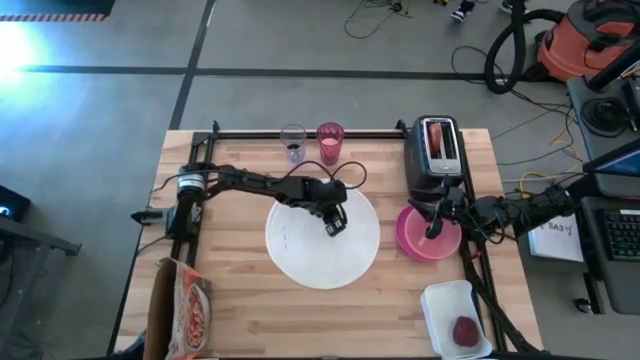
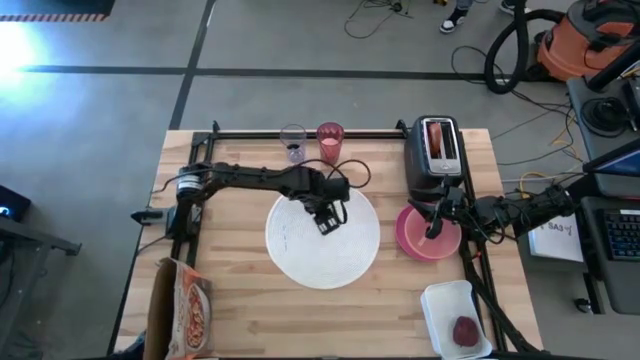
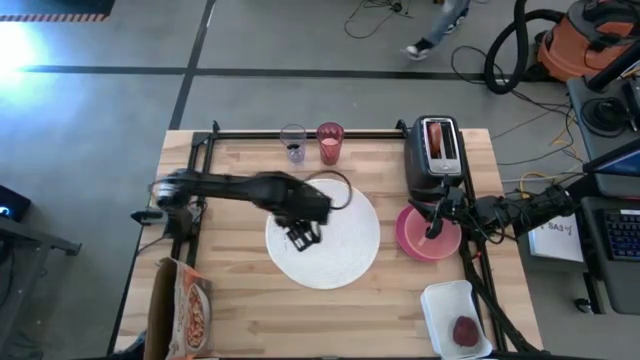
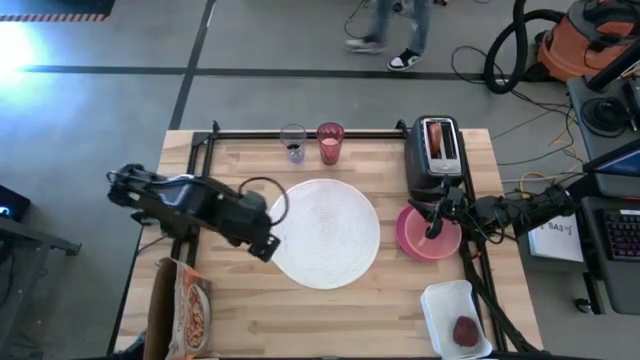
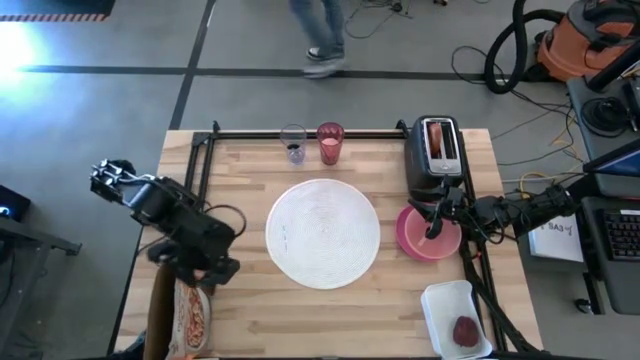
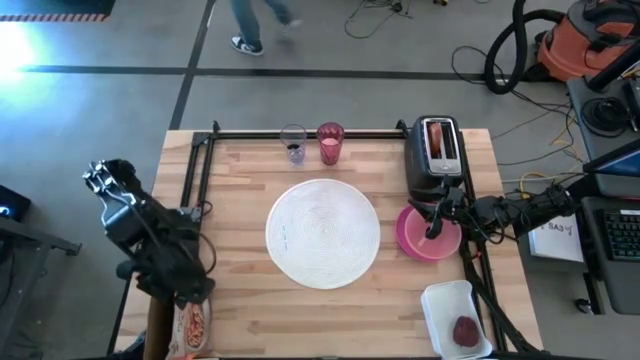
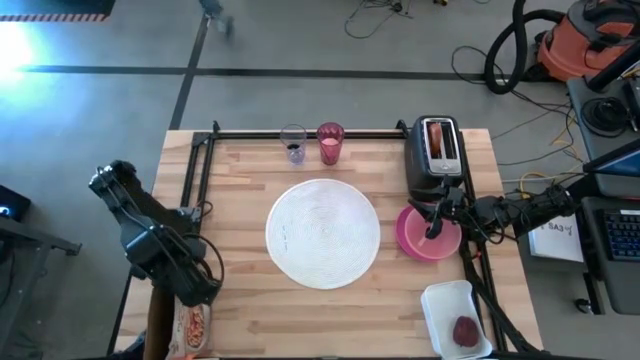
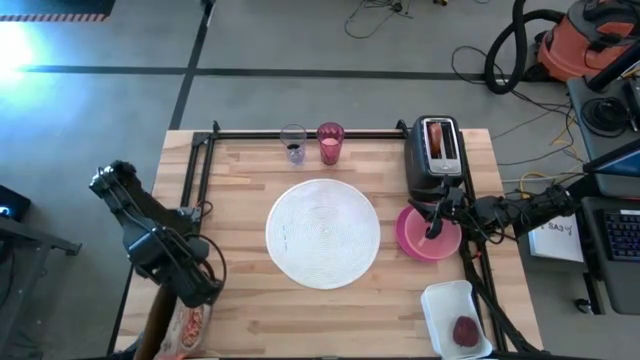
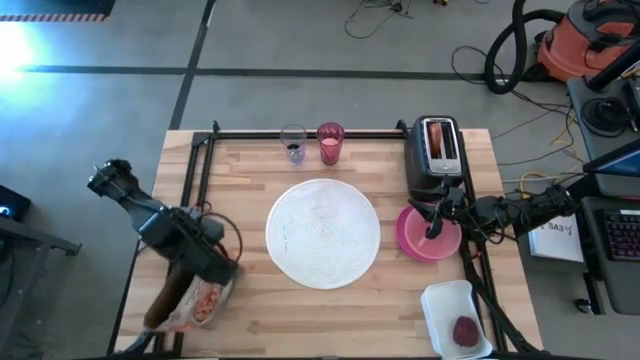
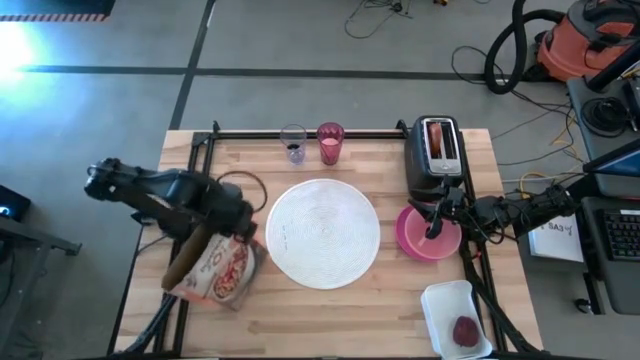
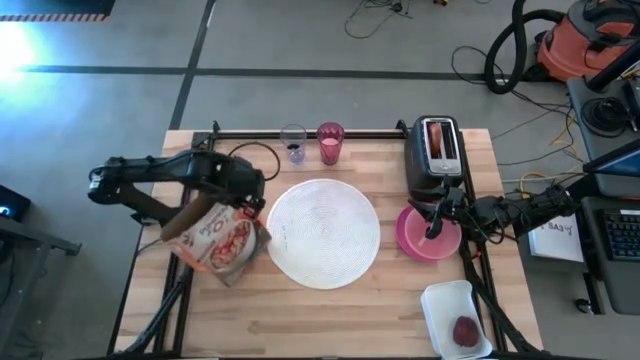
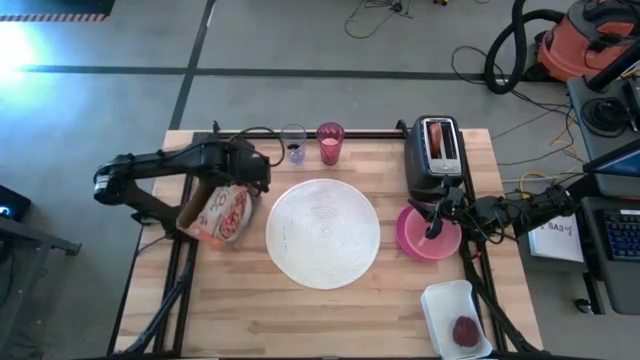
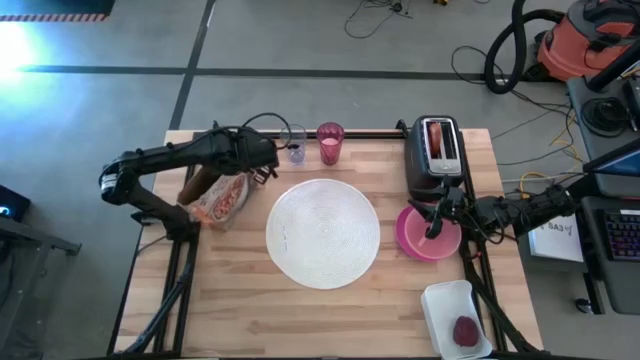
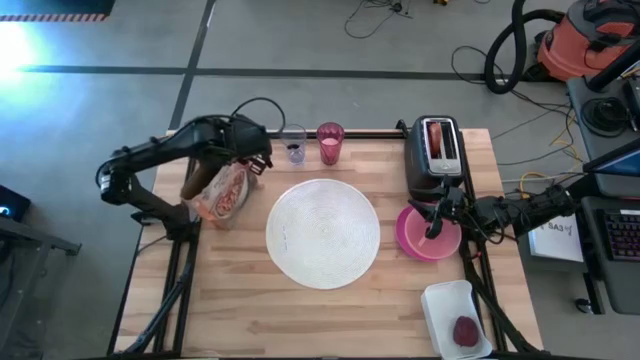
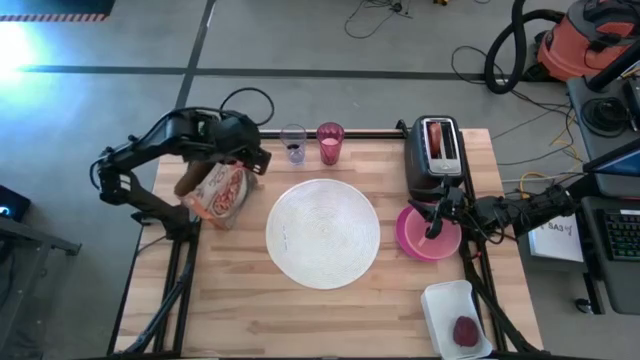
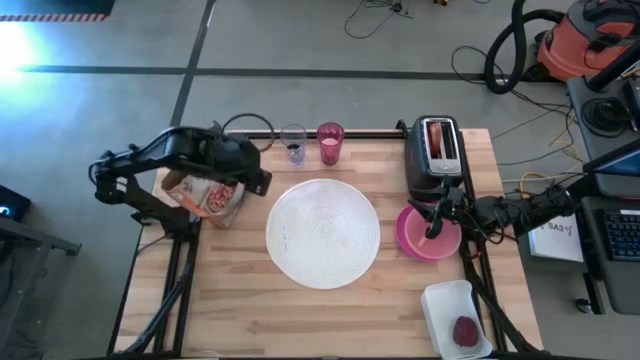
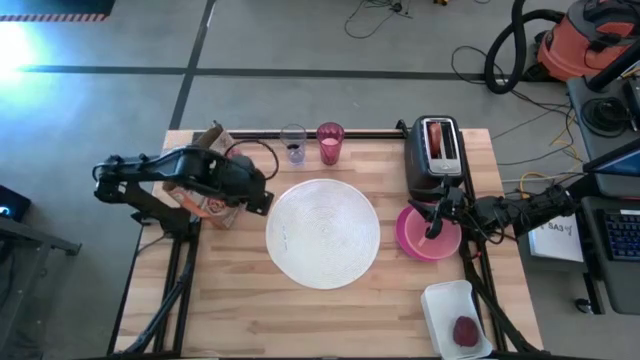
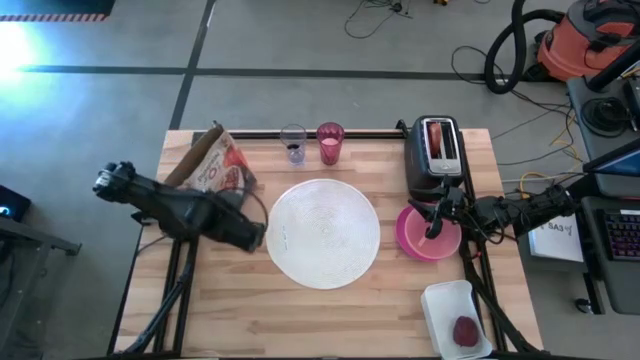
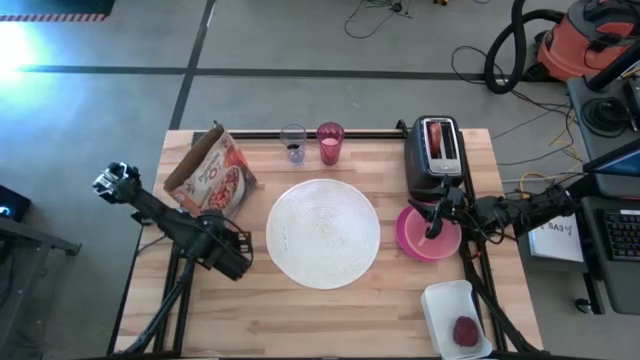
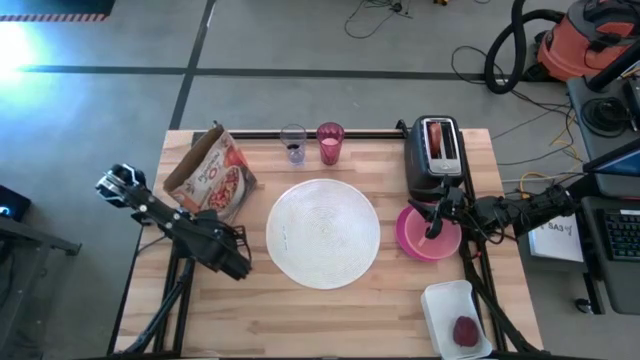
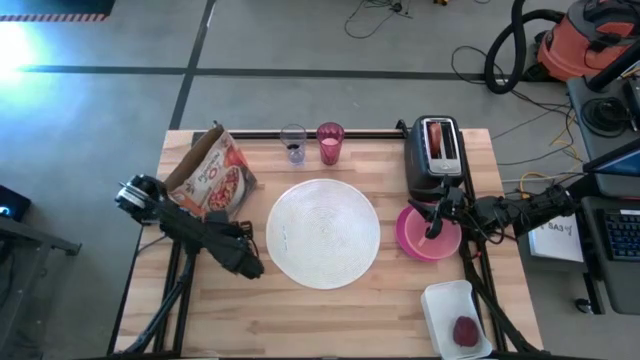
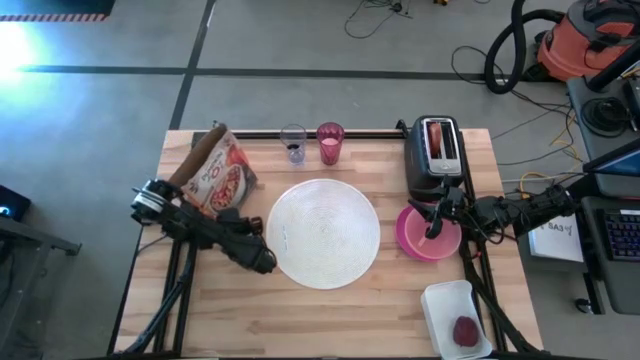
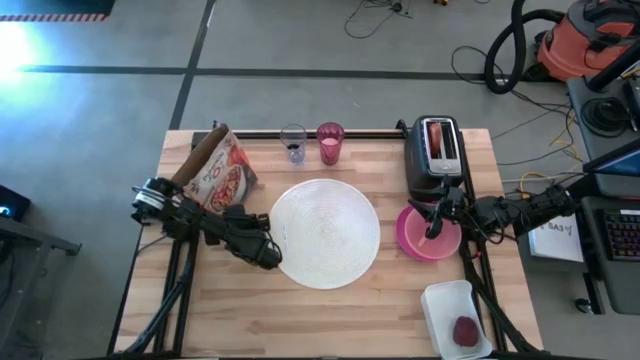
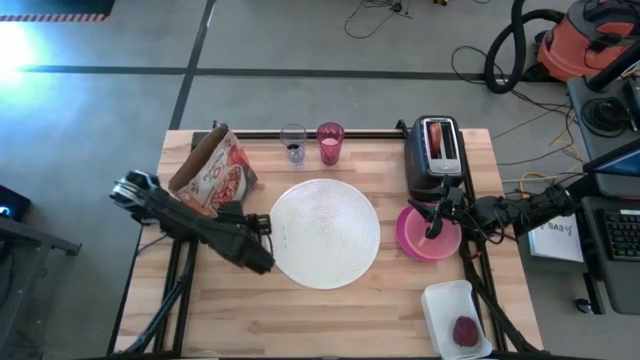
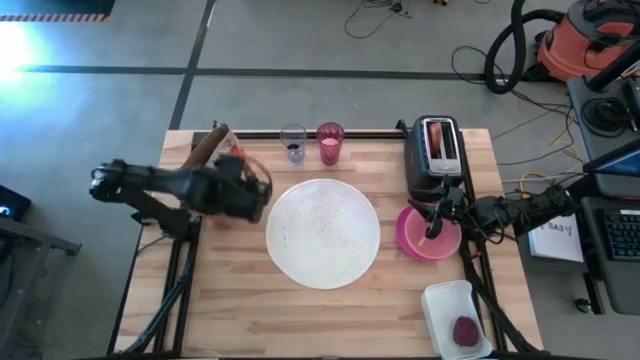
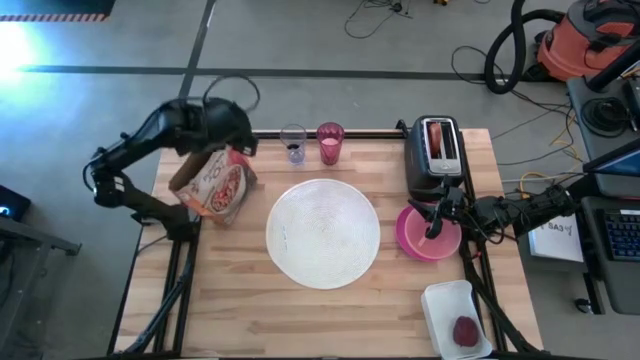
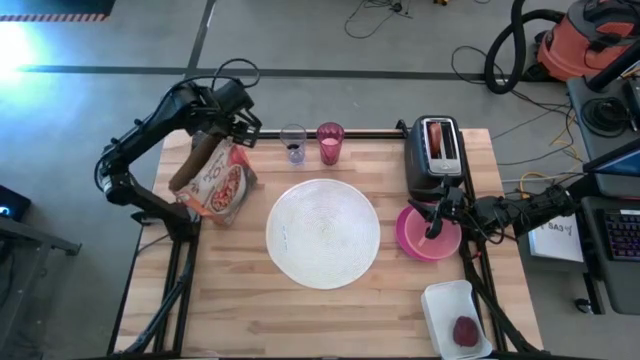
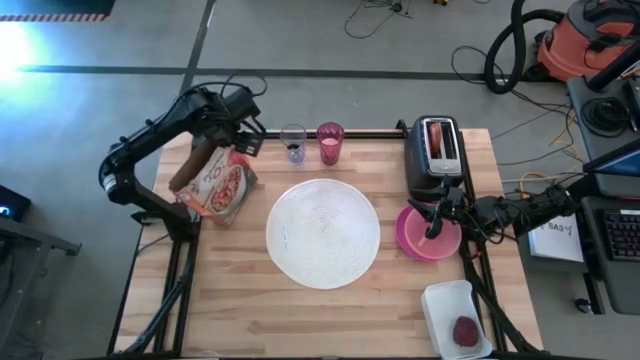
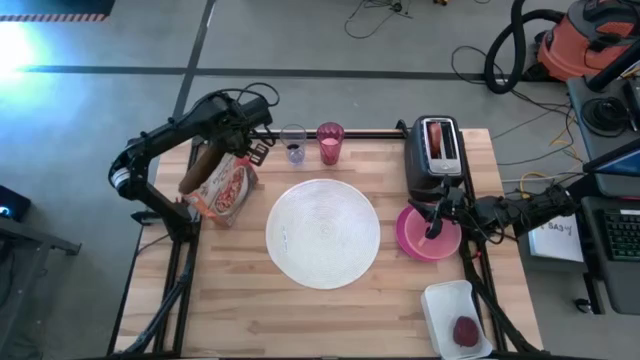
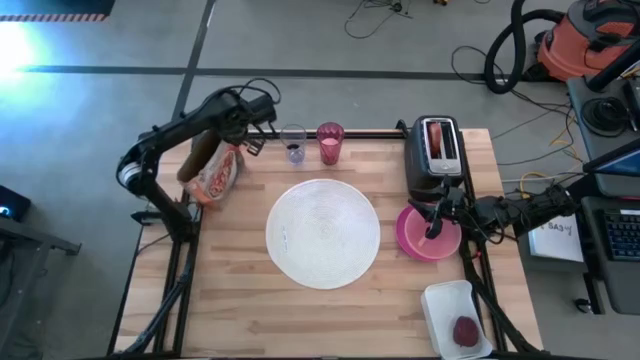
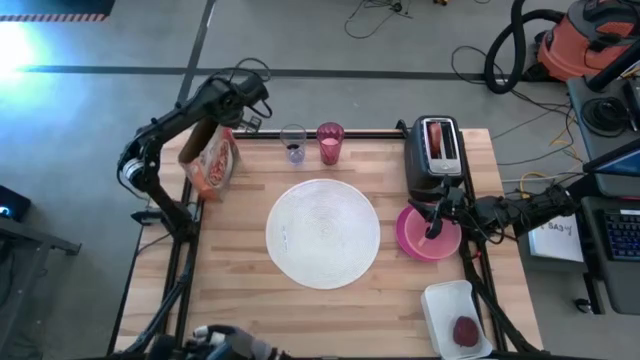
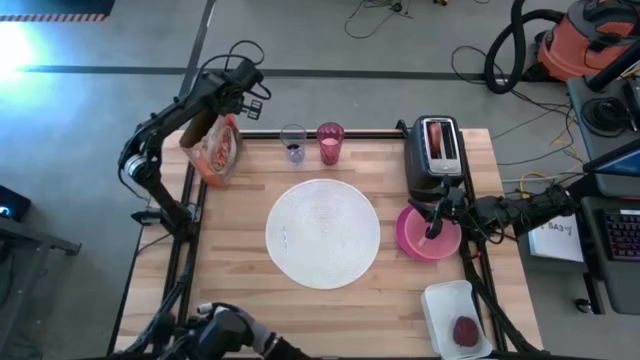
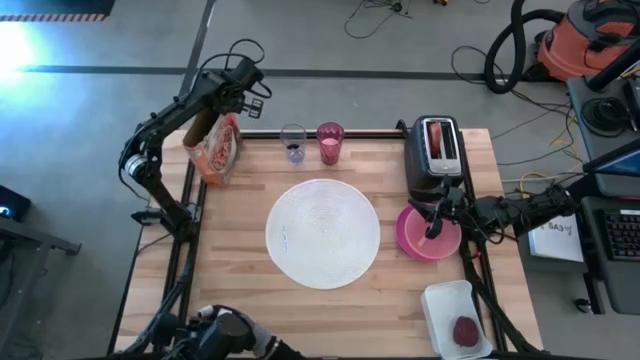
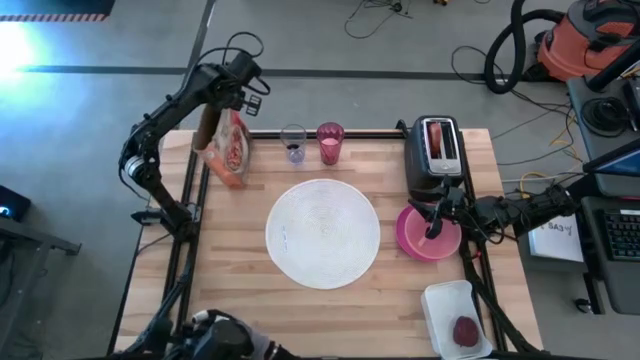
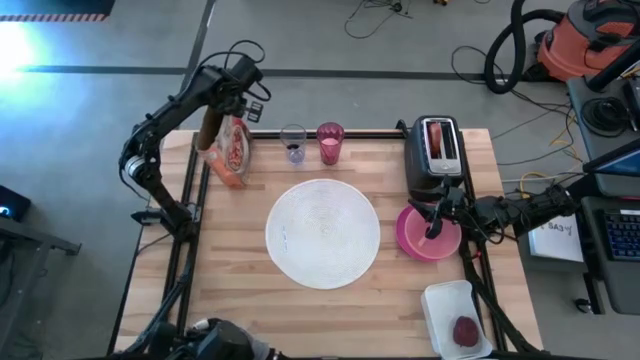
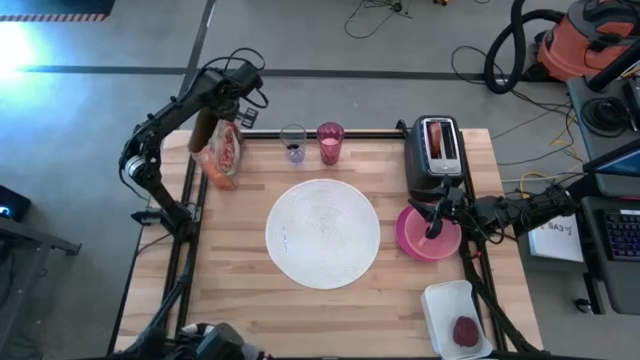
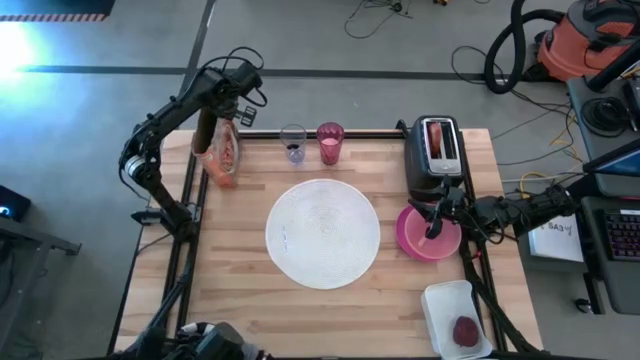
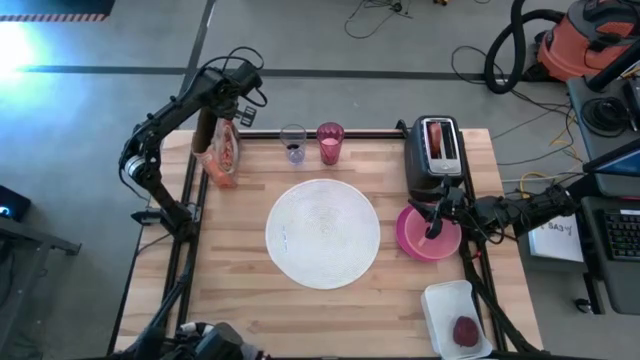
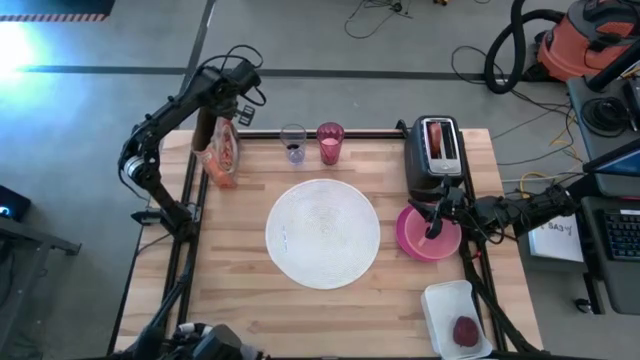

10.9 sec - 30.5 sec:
Task: Arrange a breakfast setting
Move the cereal box to the top left of the table
